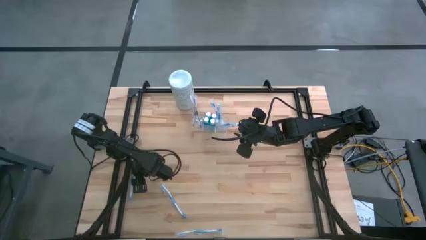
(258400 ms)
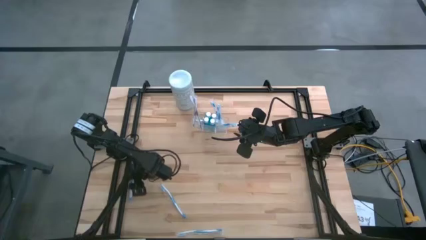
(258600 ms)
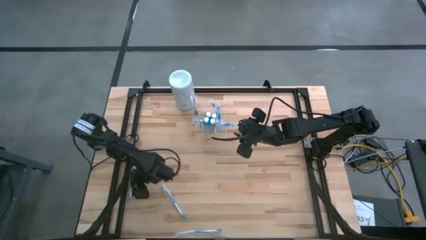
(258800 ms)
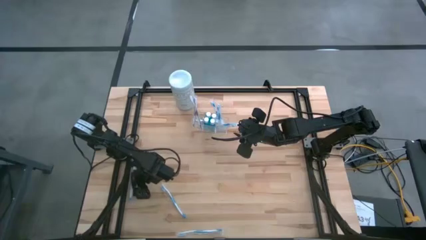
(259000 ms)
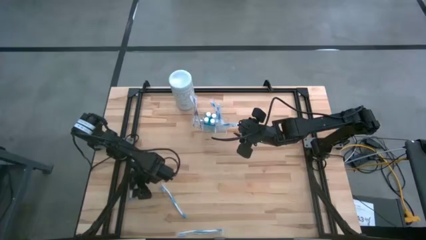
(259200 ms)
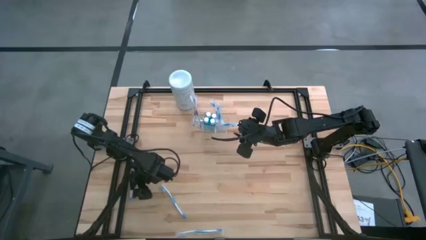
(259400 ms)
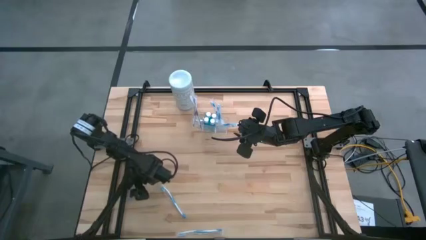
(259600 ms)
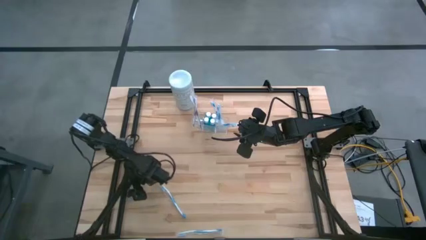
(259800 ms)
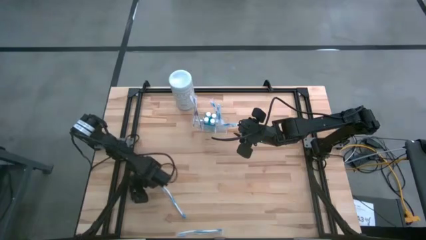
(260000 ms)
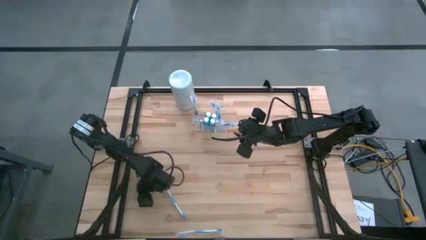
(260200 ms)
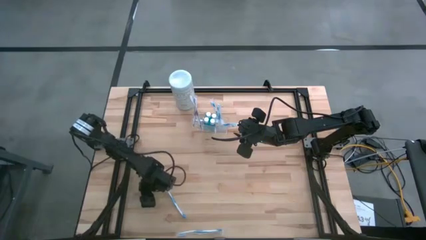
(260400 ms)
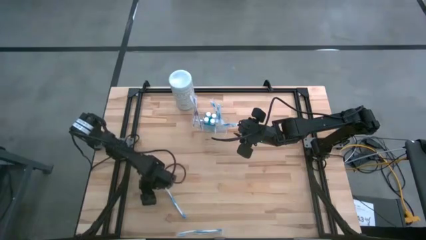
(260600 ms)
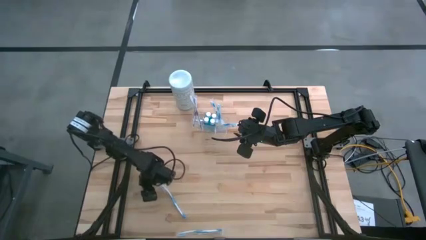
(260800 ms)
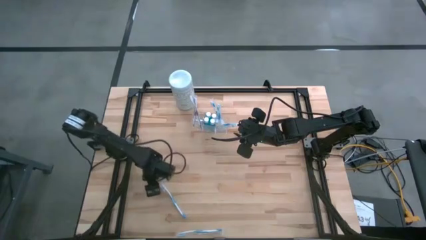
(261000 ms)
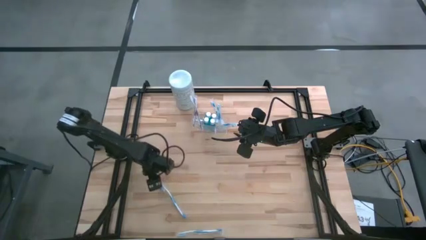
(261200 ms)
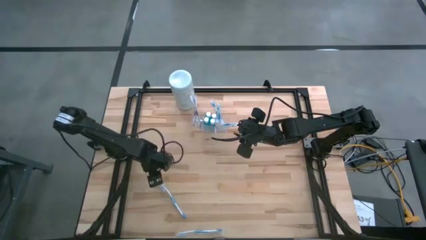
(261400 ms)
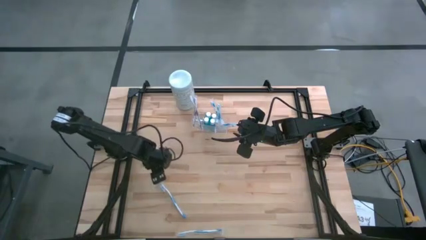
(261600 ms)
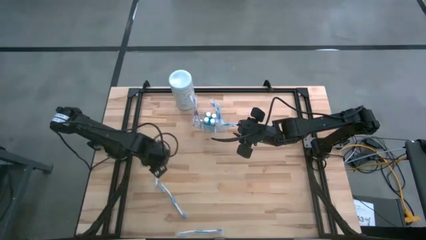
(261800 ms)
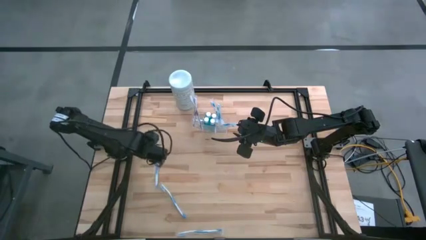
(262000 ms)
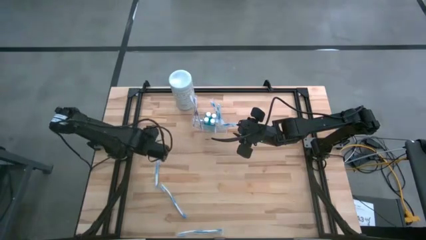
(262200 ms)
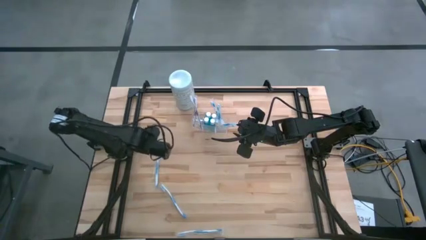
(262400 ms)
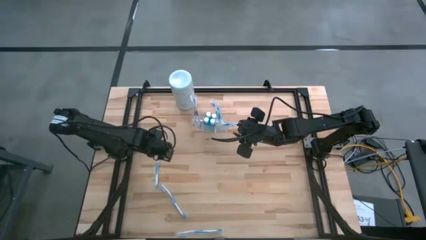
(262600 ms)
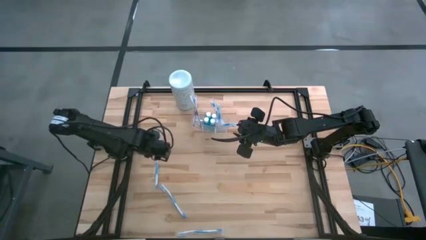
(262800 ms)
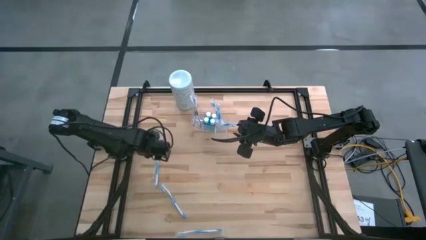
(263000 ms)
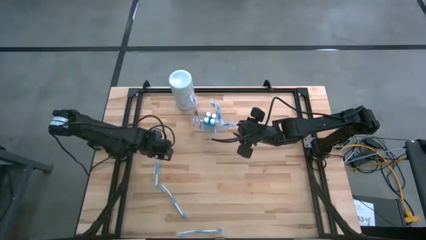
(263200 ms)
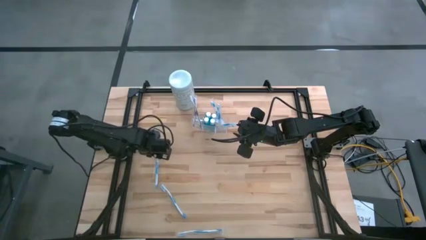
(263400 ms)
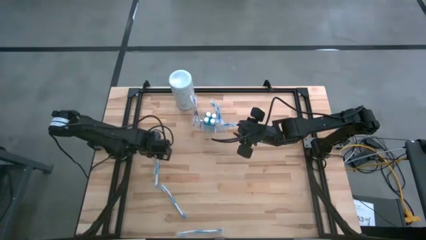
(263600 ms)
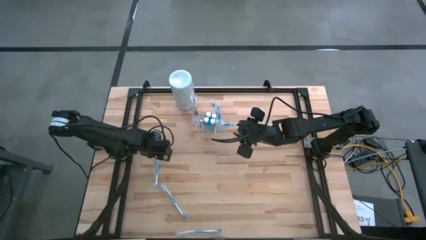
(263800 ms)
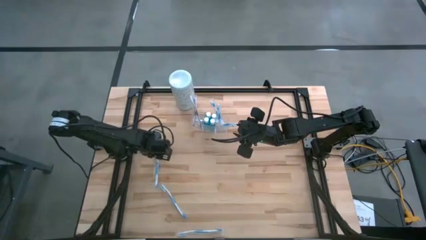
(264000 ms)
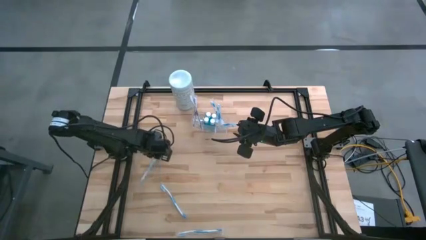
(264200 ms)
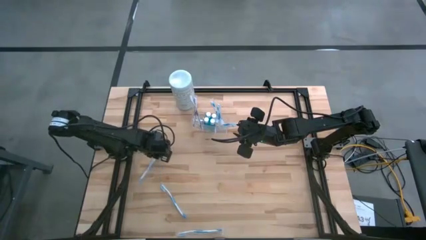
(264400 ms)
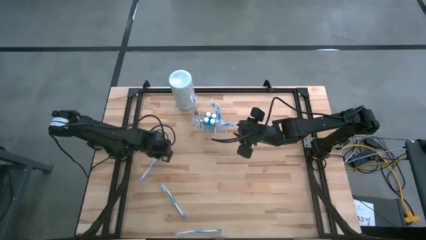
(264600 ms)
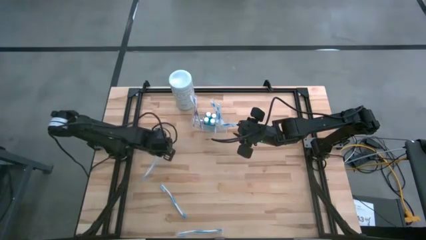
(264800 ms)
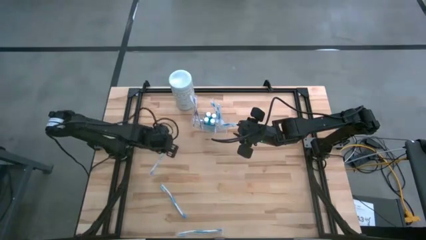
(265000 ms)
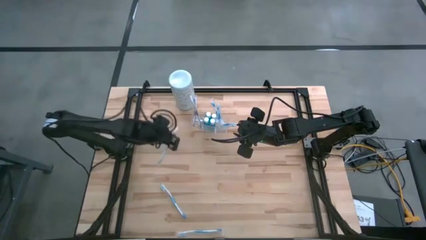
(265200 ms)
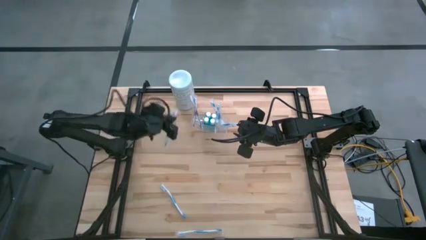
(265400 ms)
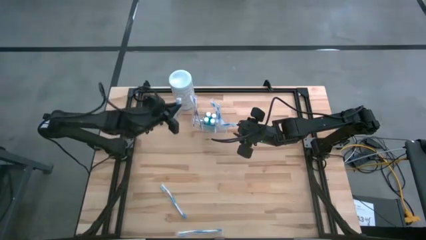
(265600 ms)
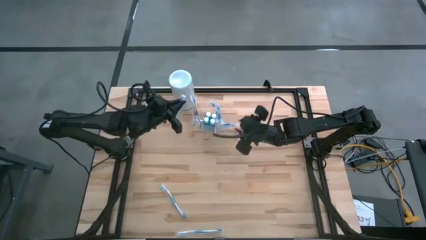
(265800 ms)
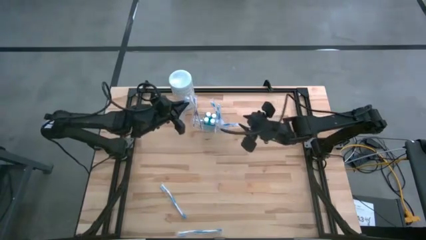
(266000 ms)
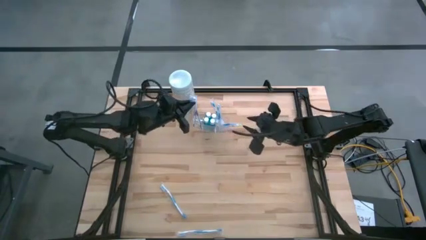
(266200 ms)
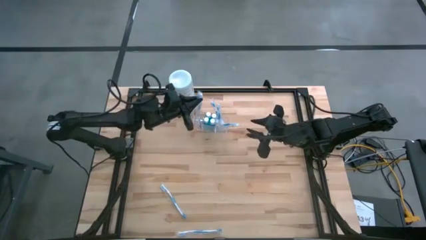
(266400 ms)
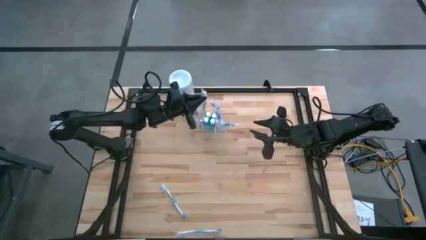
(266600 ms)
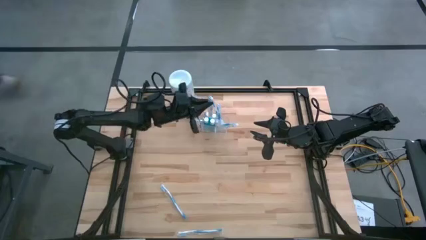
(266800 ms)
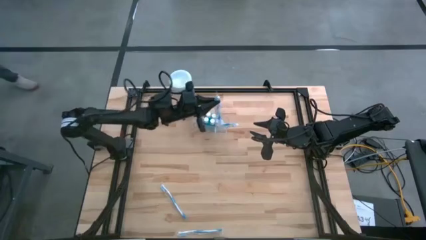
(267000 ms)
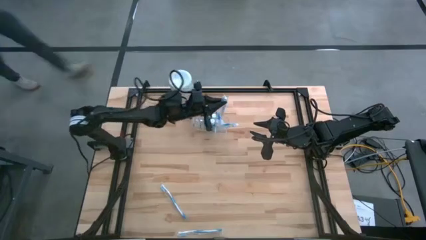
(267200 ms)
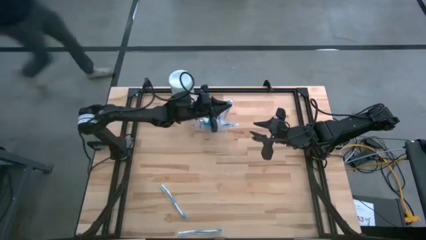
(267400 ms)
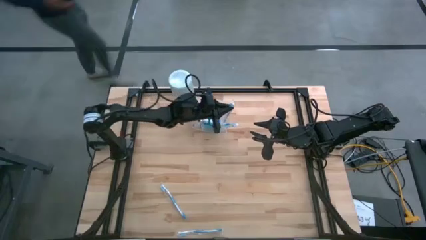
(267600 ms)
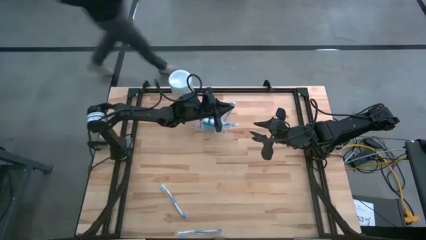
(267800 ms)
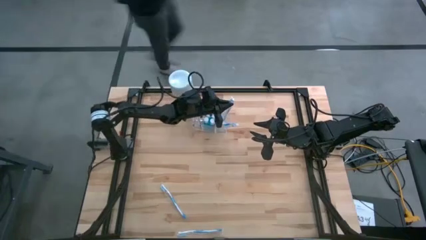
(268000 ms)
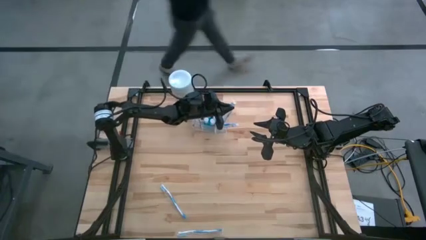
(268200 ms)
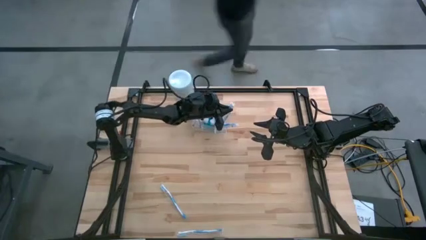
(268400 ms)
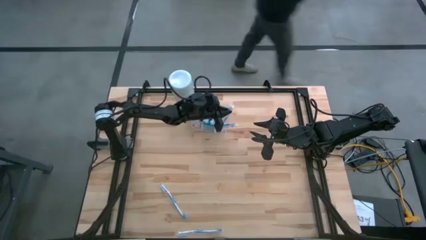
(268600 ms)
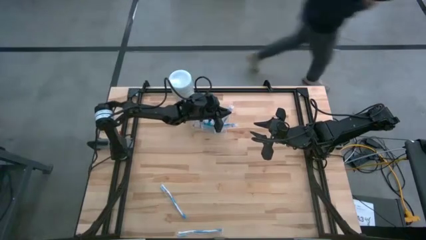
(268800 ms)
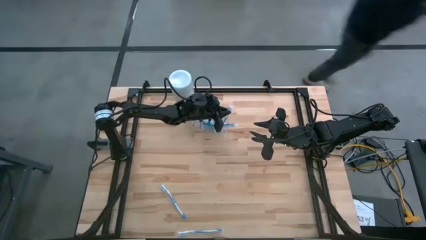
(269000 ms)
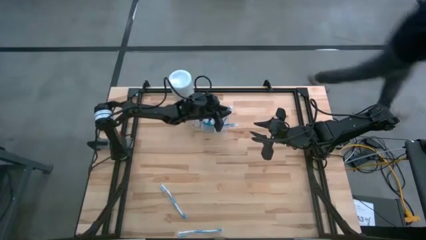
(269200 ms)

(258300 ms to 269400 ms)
Task: Pick & Place toothbrushing station
Put the blue toothbrush into the right of the transparent organizer

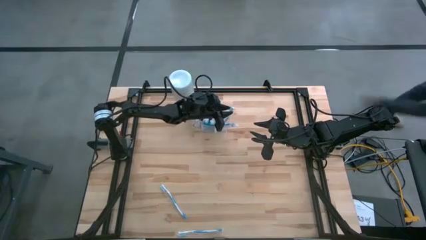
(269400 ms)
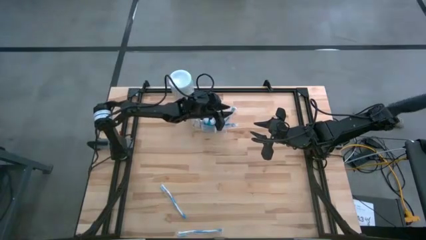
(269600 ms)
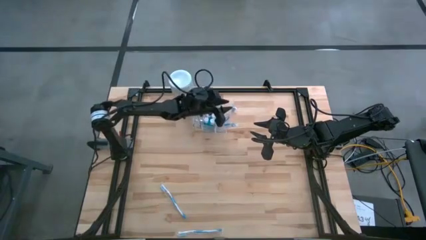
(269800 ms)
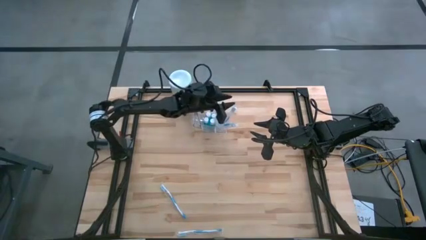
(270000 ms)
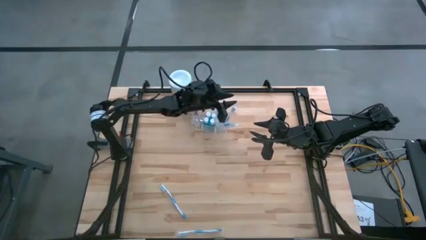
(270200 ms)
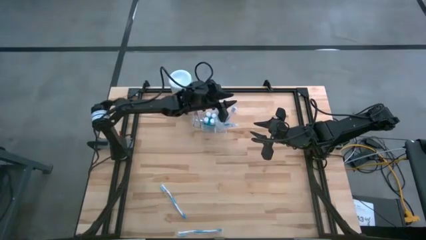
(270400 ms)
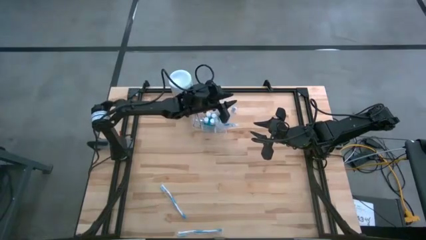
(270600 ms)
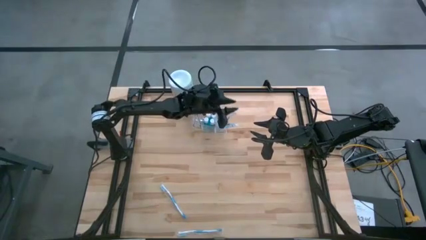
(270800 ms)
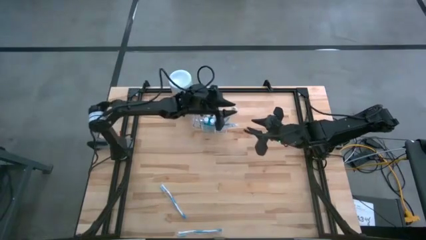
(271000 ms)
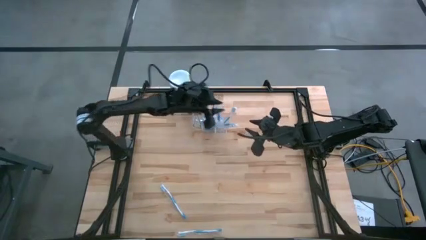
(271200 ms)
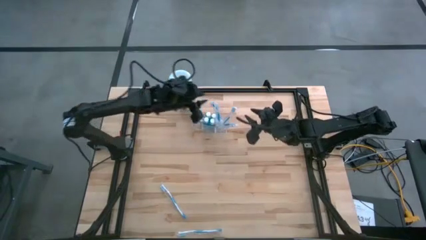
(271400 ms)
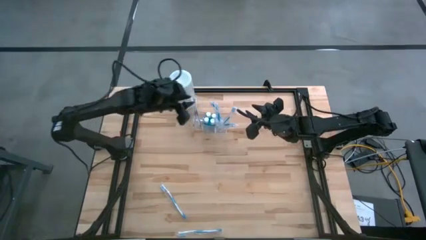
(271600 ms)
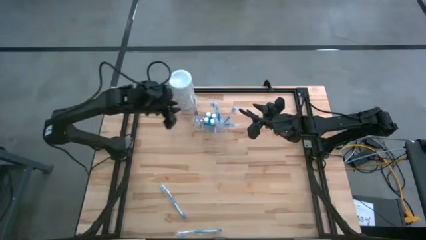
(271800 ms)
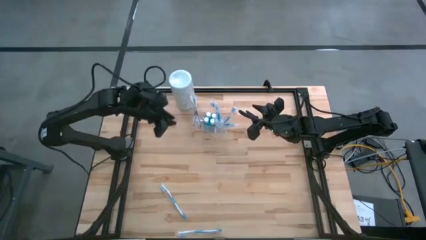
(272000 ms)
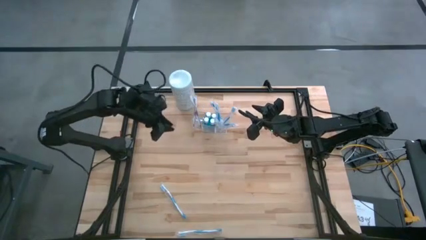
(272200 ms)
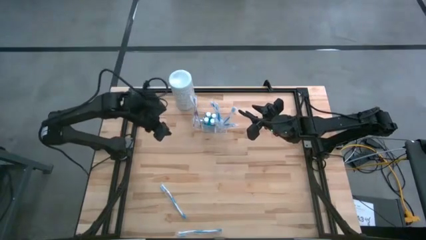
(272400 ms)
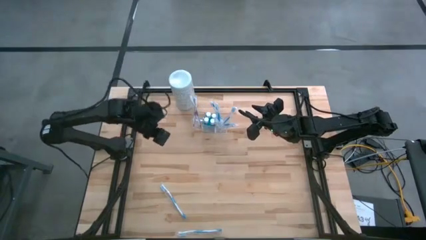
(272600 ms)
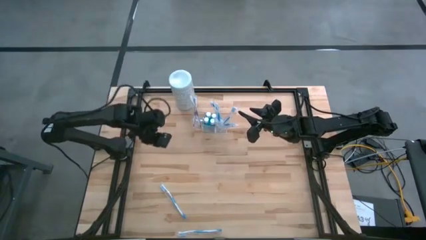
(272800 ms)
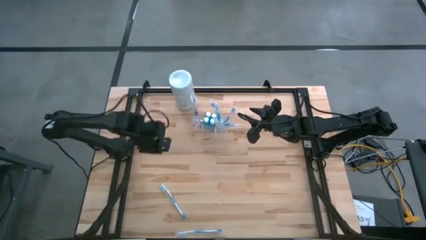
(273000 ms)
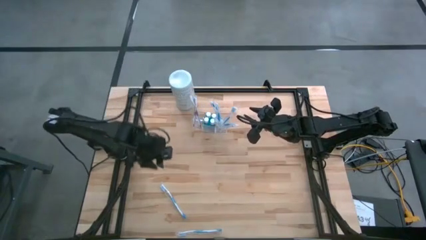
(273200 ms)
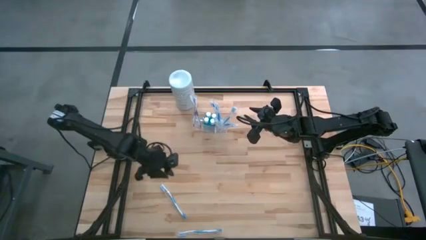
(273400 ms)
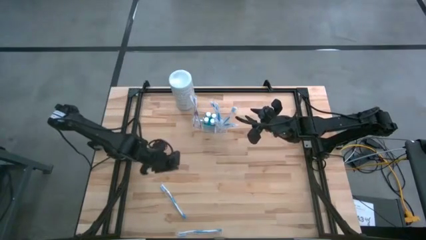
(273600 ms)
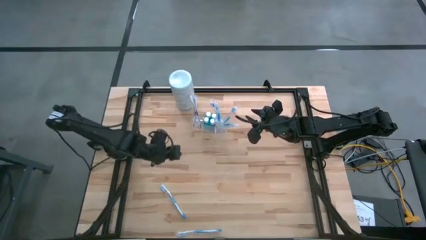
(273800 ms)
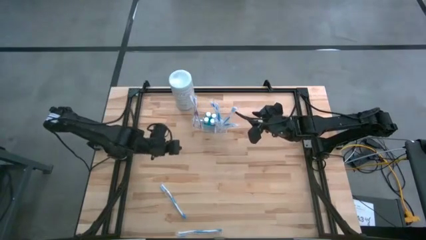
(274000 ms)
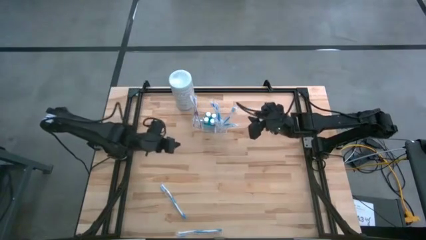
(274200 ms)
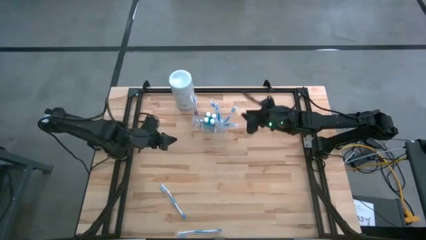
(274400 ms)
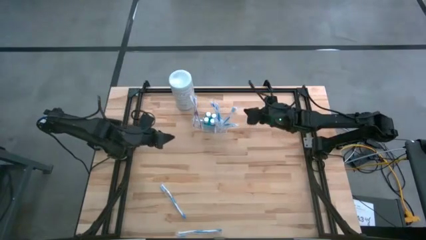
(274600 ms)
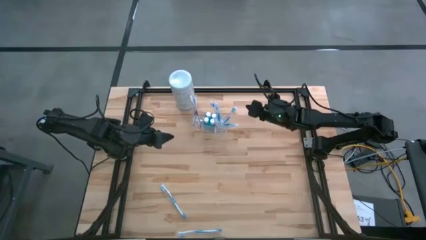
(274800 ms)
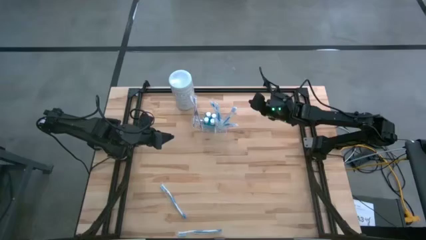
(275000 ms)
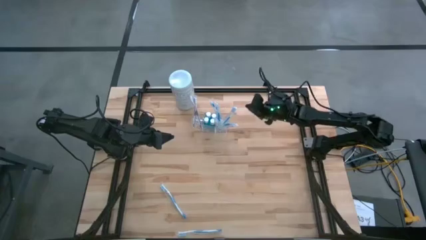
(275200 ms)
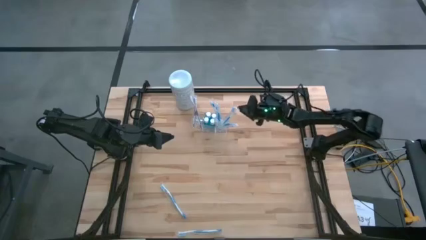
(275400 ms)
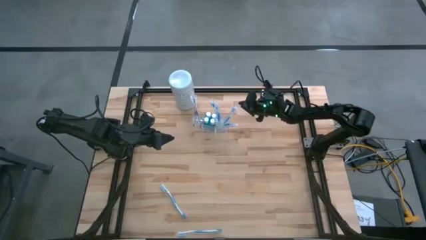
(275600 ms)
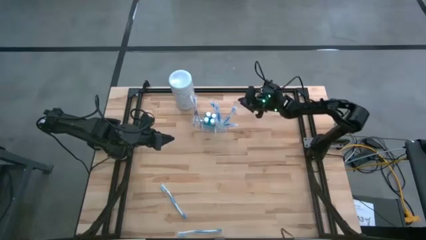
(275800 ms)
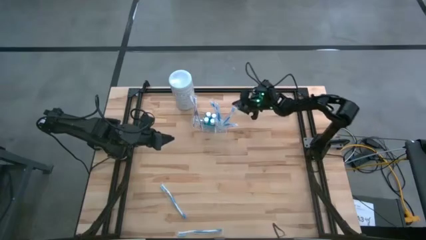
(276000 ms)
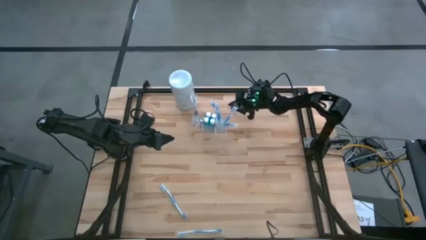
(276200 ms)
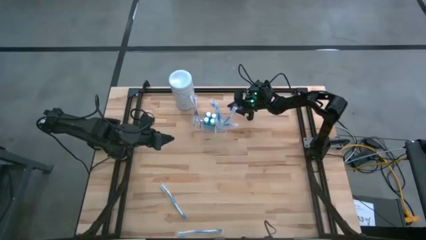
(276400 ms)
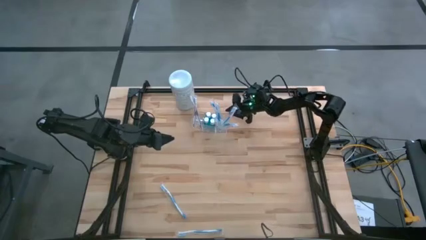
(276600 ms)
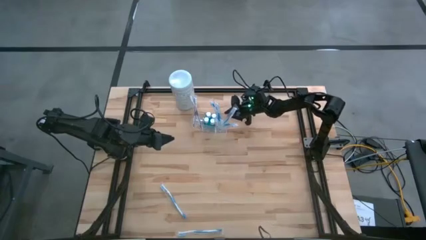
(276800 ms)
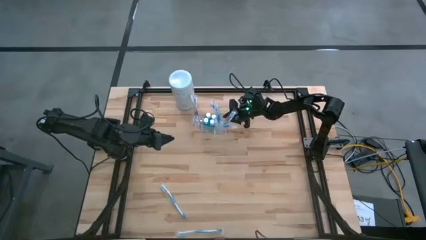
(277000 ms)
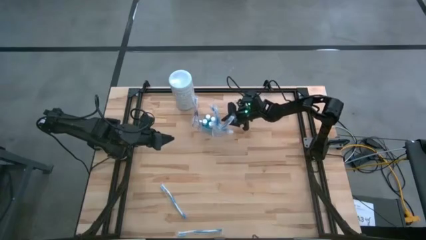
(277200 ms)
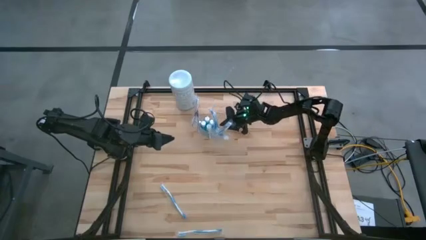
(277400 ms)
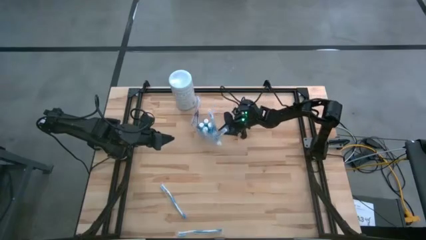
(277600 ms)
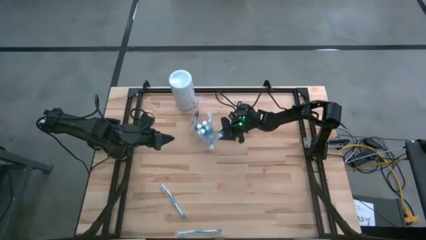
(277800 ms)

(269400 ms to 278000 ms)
Adjust the transparent organizer
